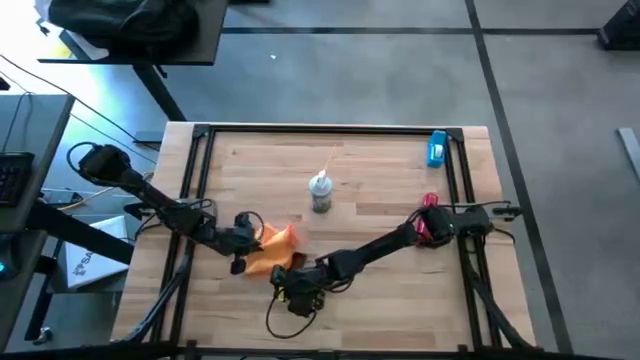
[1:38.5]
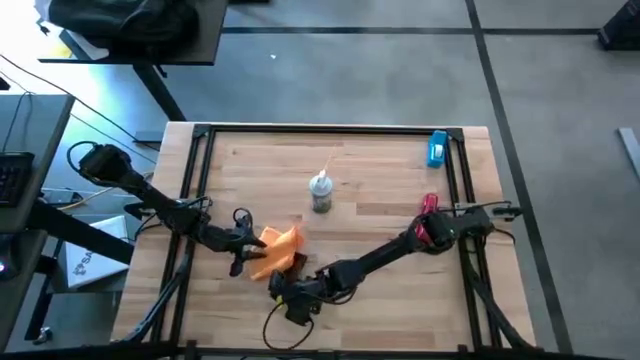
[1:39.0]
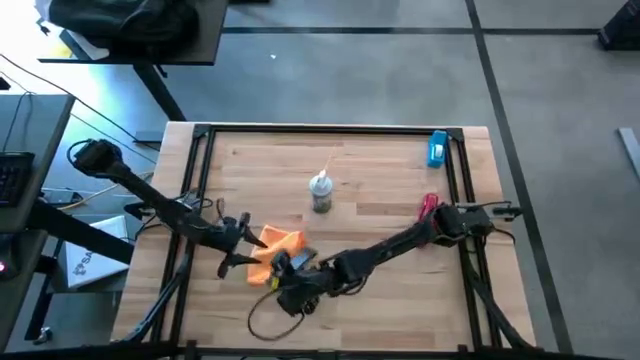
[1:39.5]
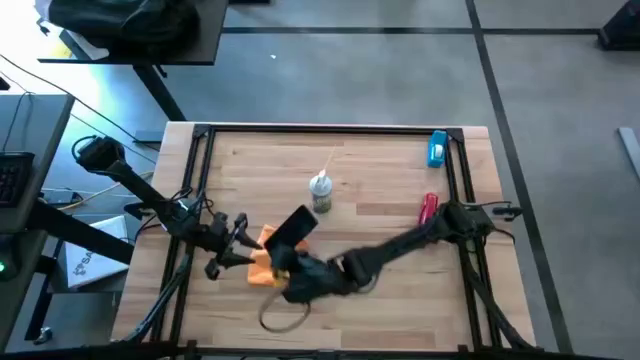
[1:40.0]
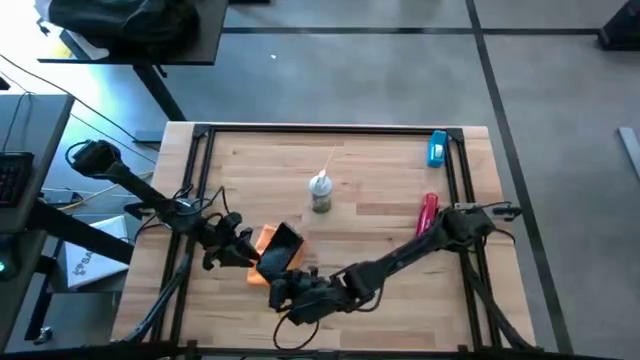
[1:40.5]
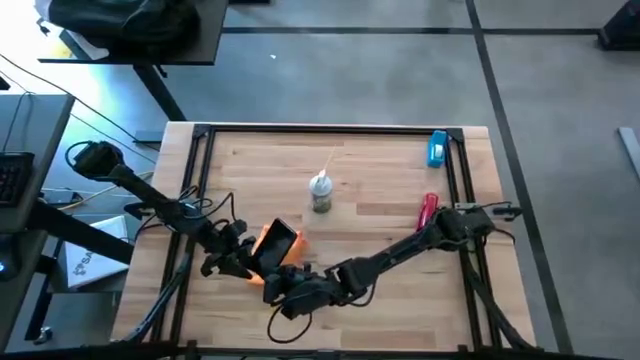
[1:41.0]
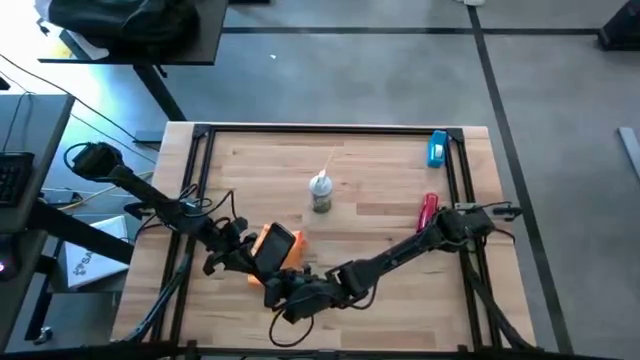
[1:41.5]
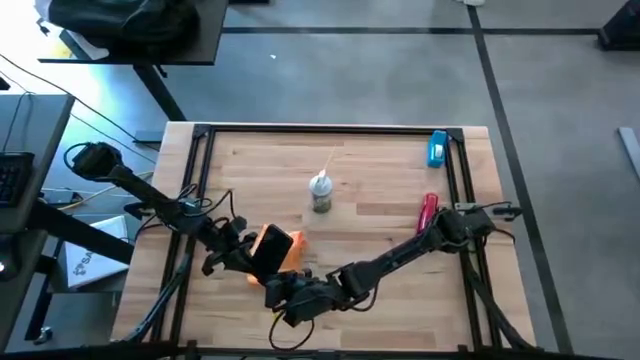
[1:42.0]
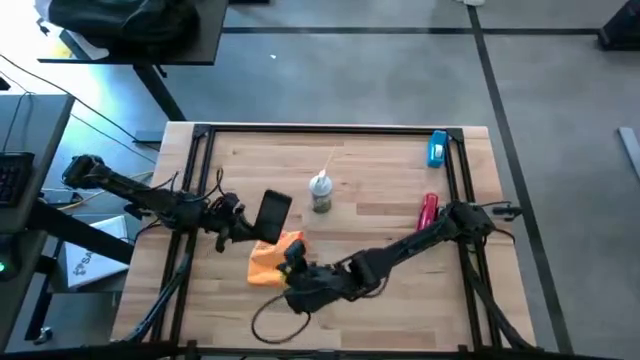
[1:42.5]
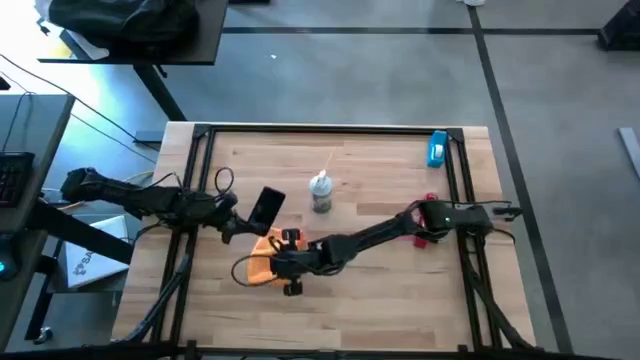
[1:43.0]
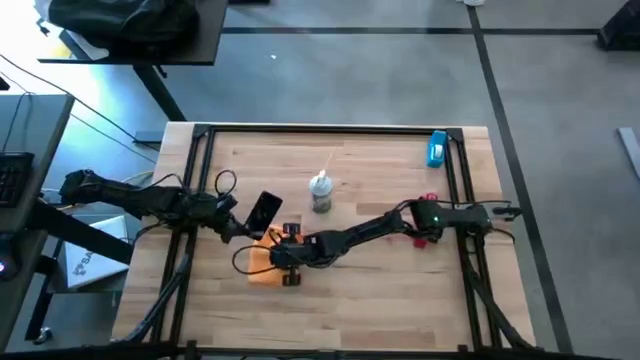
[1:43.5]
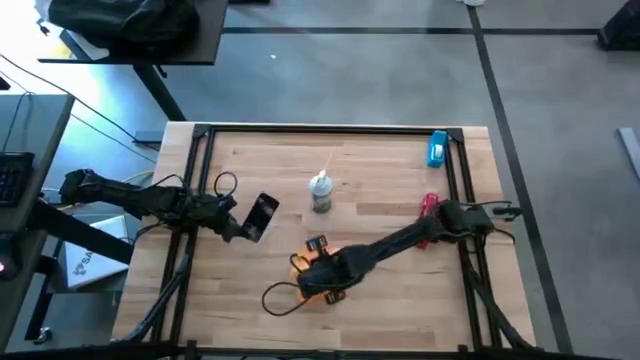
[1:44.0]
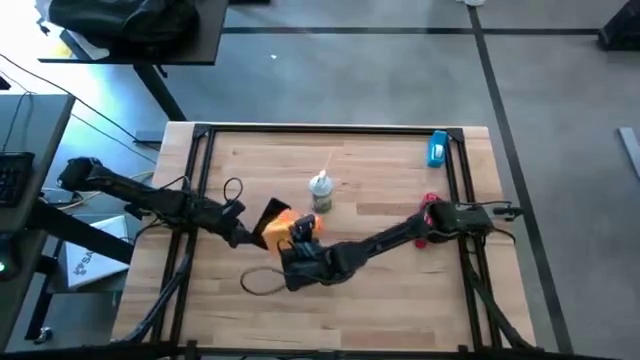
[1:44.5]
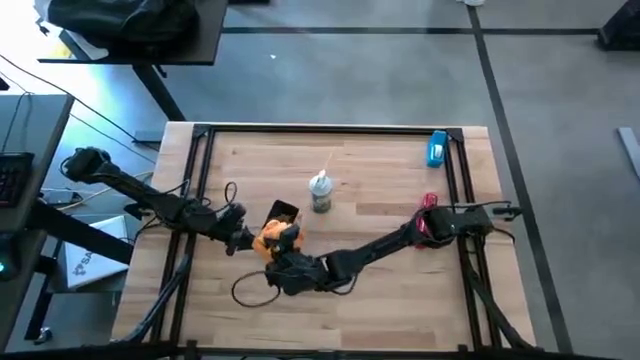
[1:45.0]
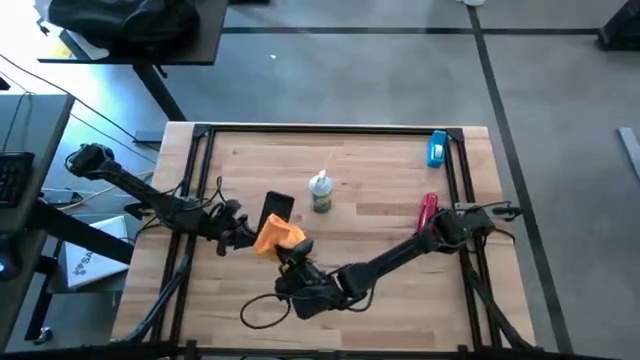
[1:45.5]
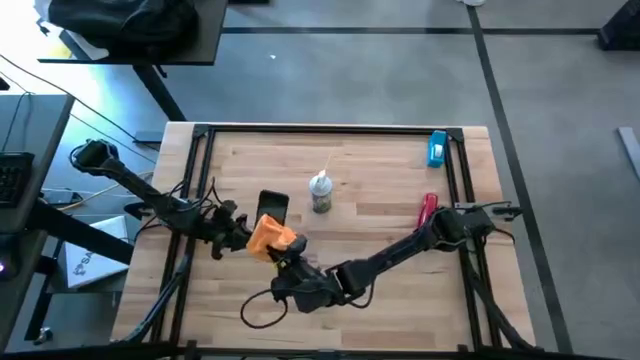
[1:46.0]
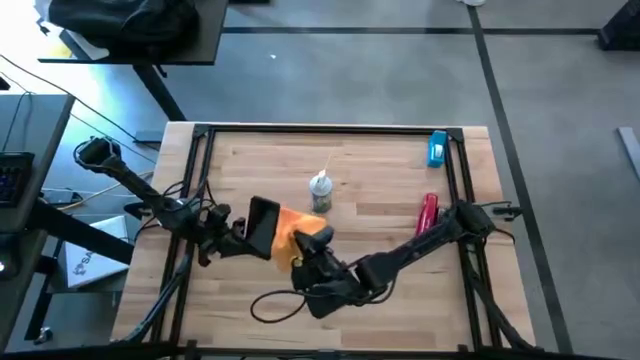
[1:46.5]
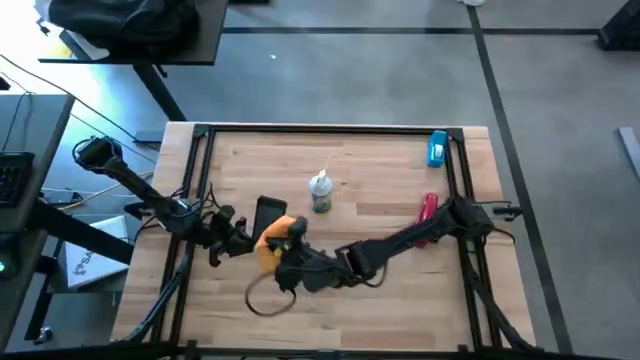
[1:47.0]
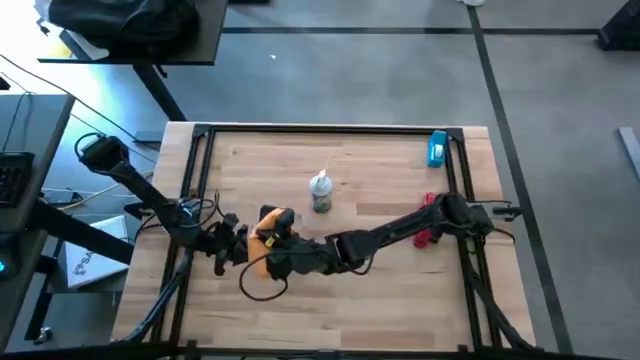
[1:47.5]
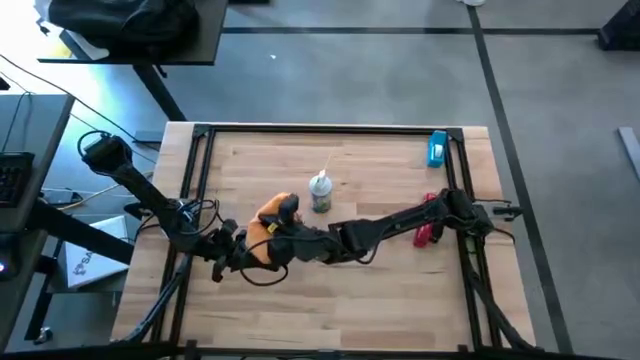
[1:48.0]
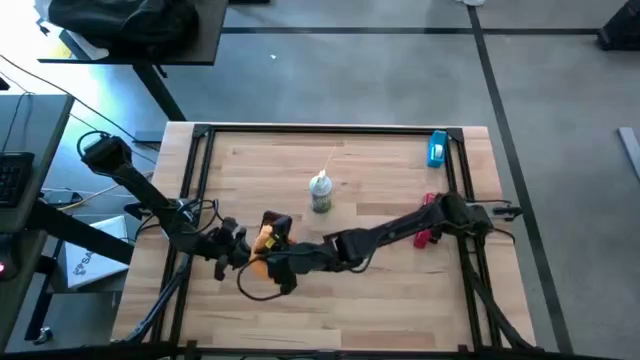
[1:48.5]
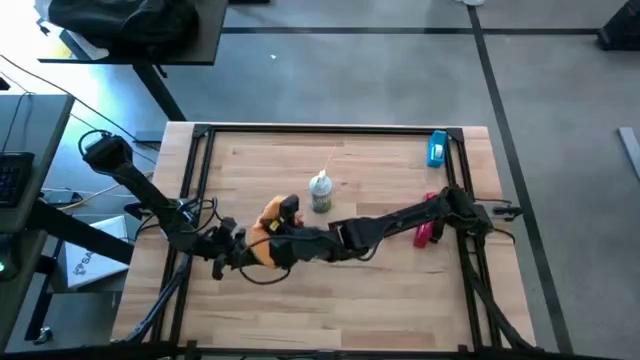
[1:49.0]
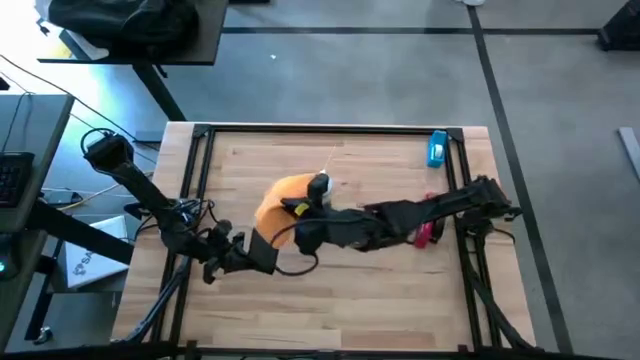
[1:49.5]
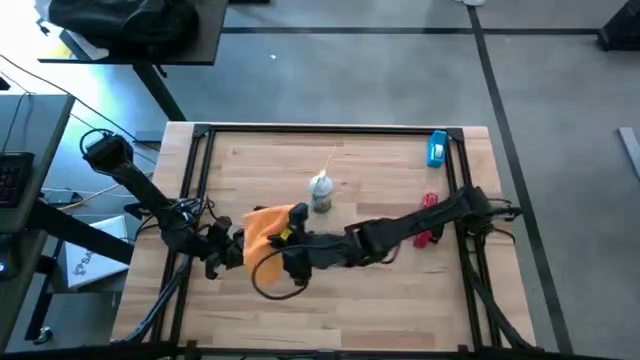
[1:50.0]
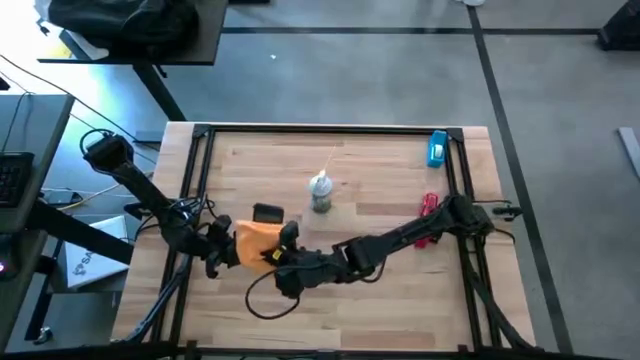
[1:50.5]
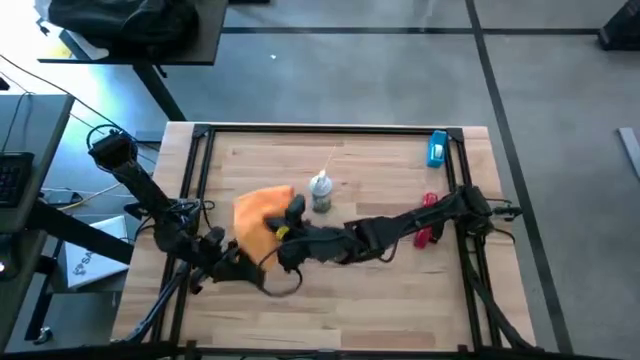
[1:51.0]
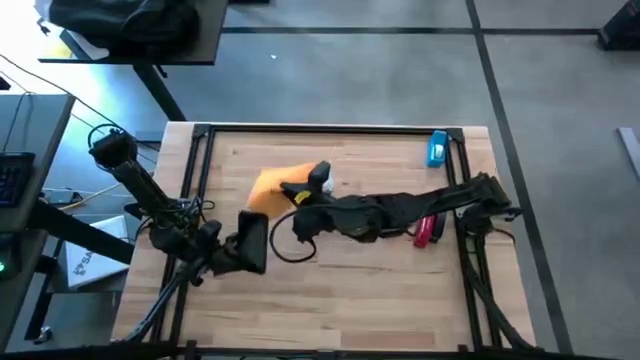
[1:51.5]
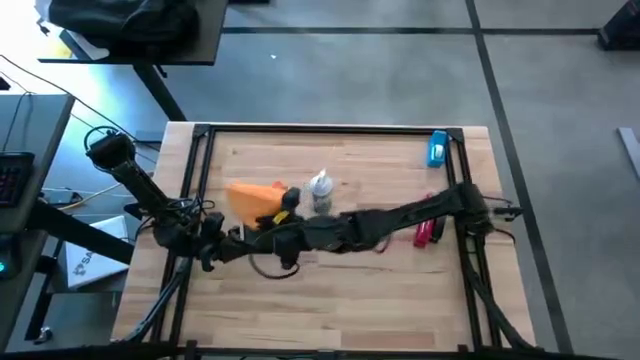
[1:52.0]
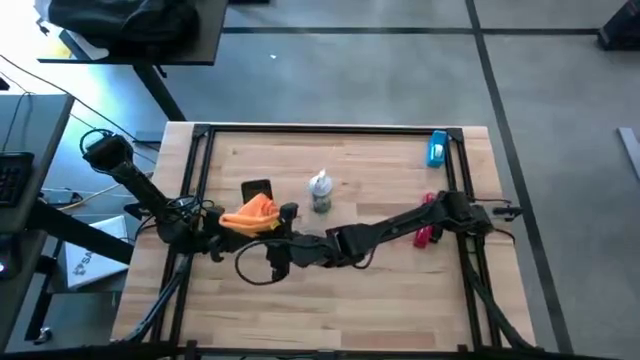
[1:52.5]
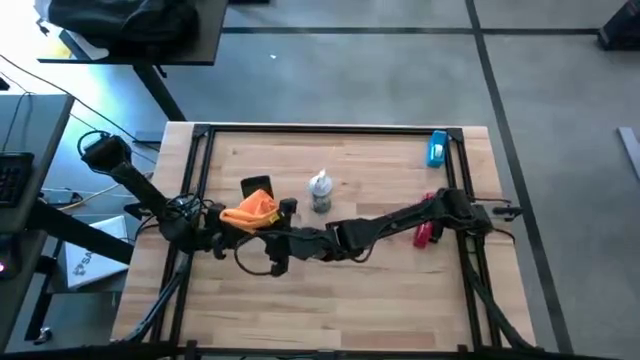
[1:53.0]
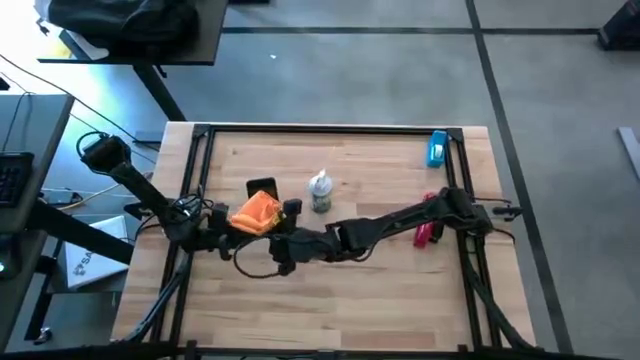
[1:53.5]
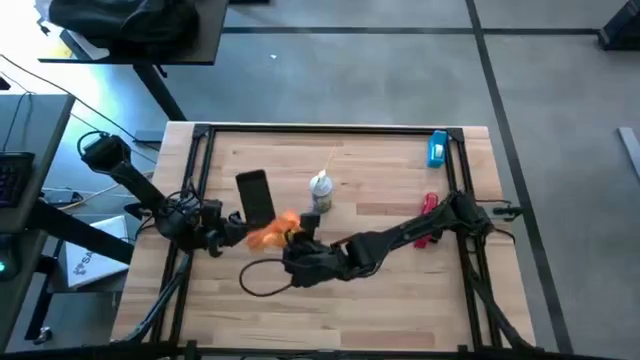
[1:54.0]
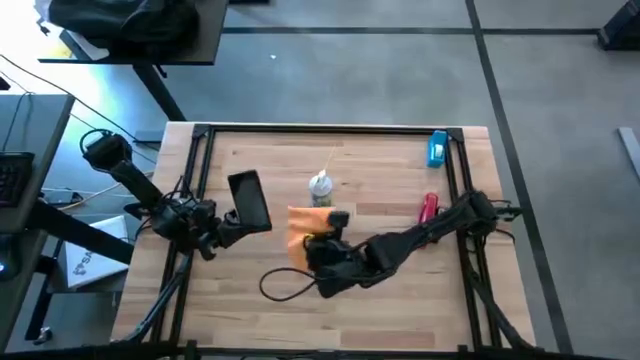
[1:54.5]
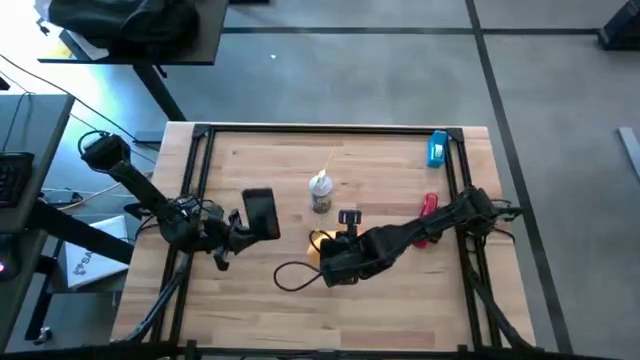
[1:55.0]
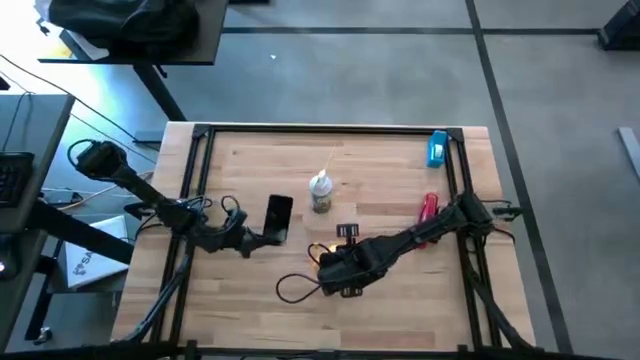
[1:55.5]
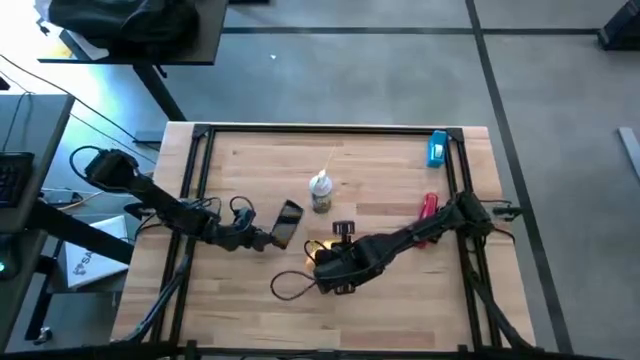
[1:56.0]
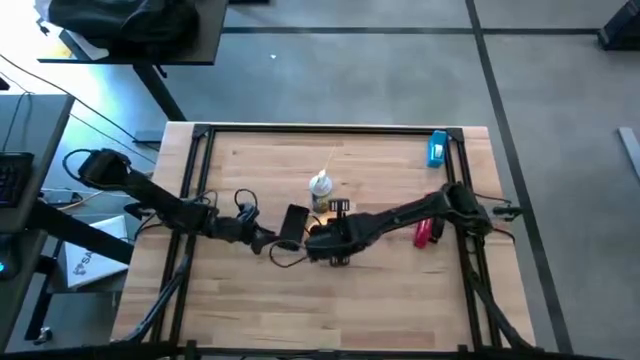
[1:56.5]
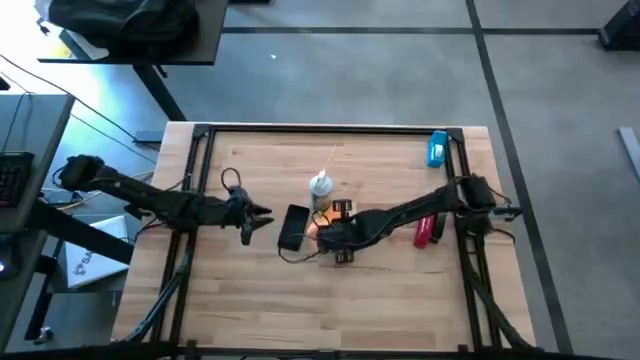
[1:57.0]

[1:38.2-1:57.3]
Task: Apply microfiber cloth
Wipe the black cellphone using the green microfiber cloth
